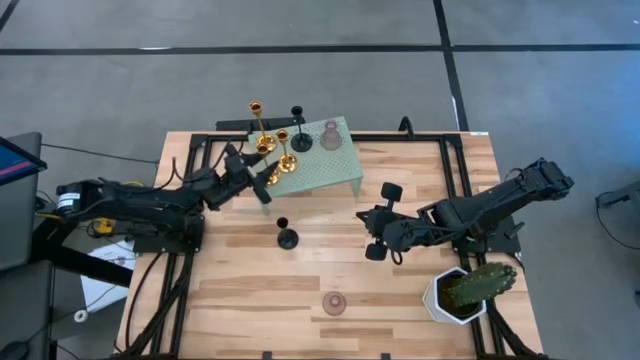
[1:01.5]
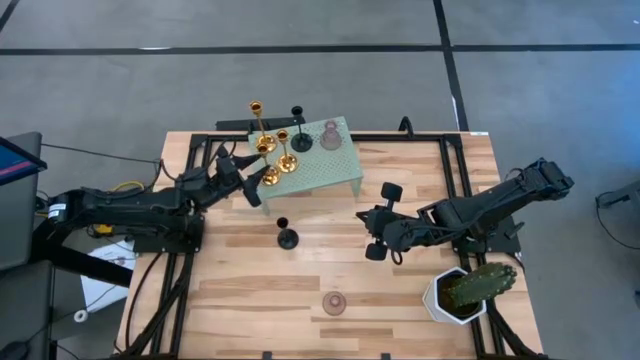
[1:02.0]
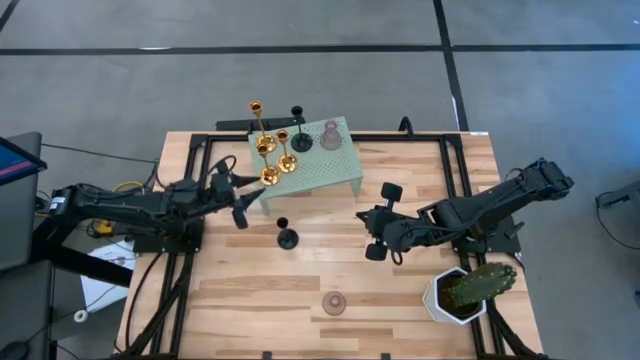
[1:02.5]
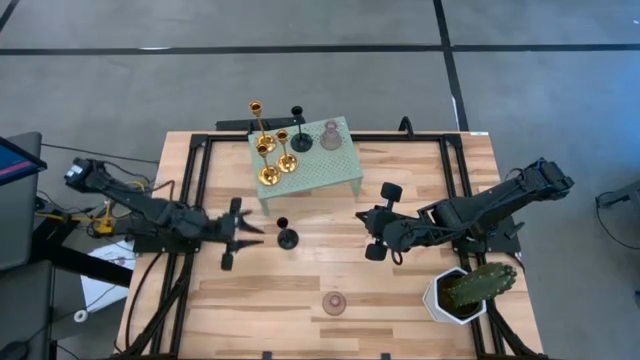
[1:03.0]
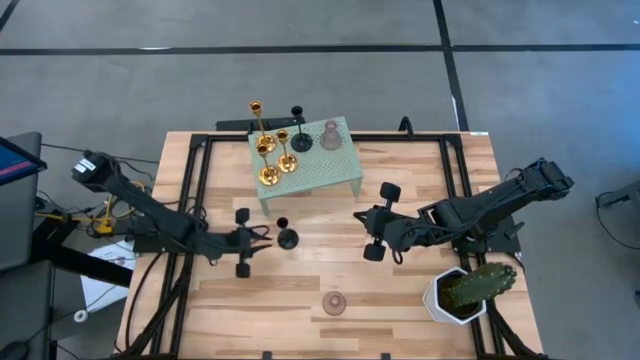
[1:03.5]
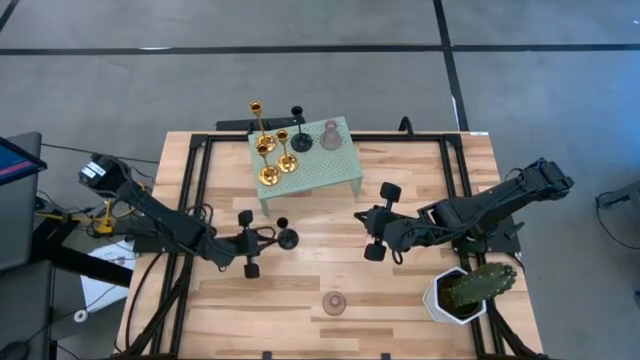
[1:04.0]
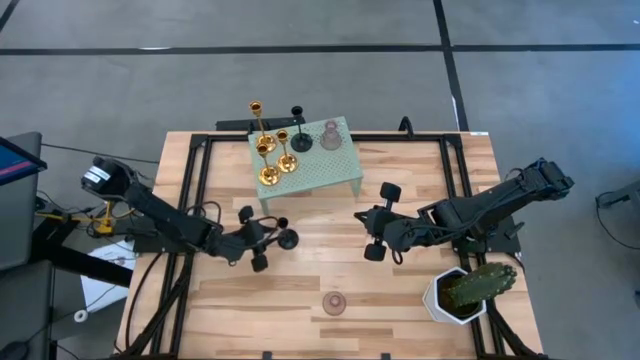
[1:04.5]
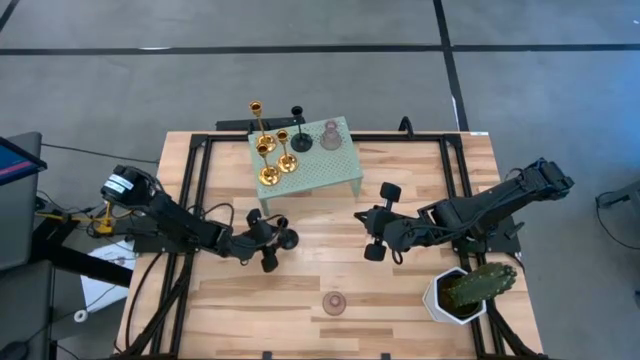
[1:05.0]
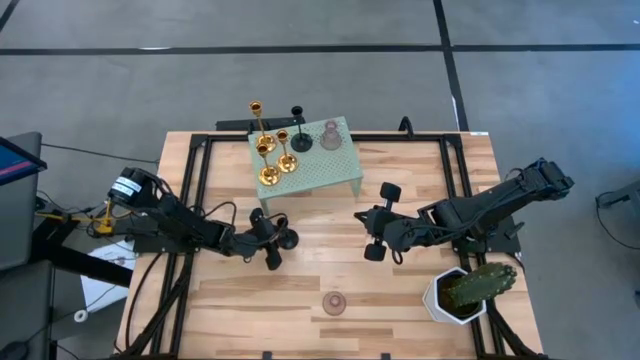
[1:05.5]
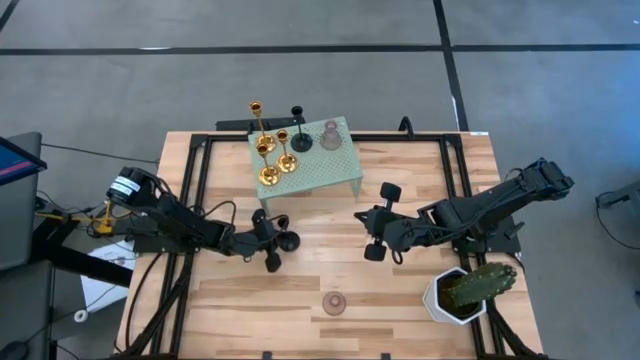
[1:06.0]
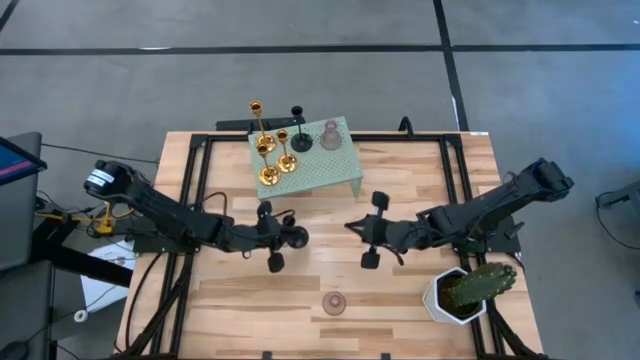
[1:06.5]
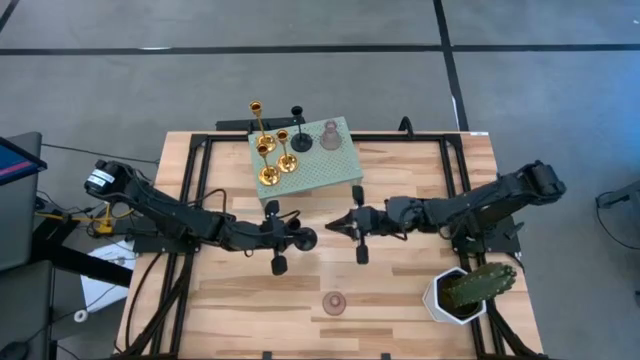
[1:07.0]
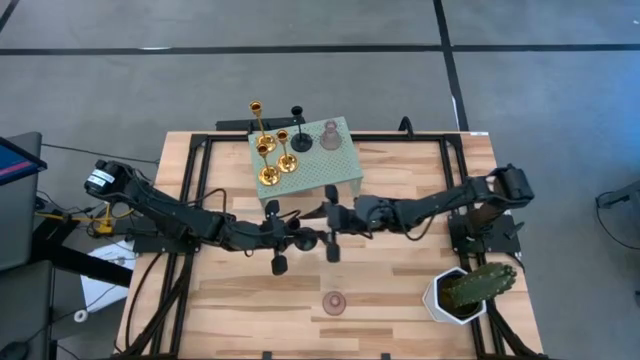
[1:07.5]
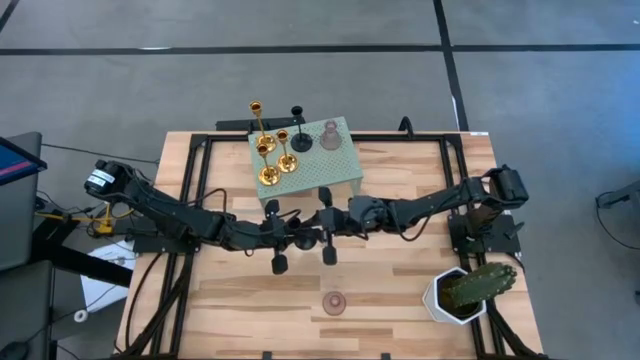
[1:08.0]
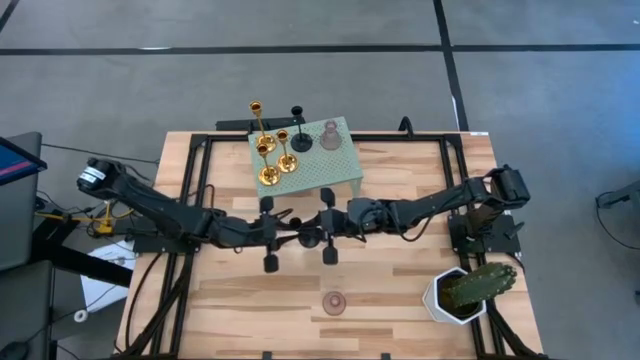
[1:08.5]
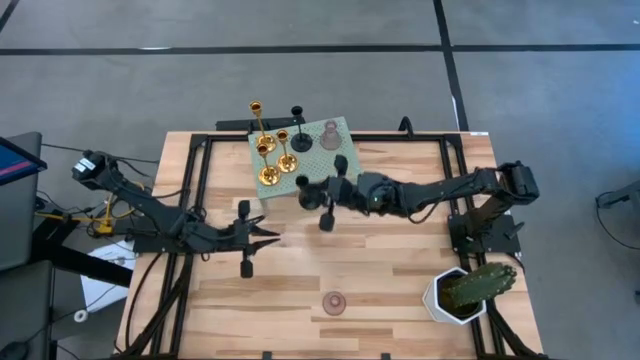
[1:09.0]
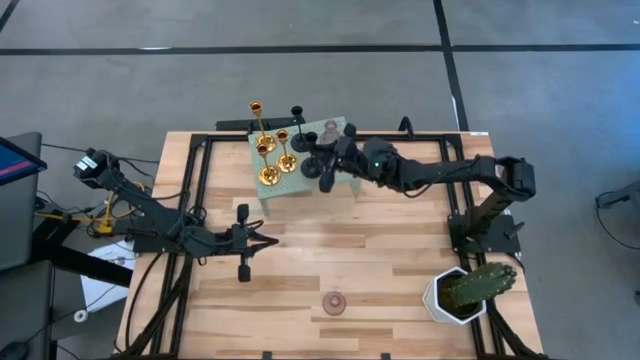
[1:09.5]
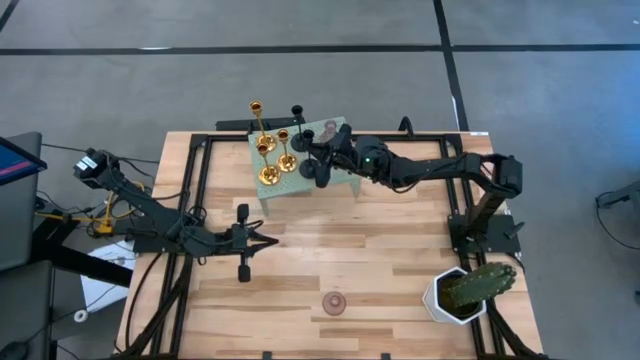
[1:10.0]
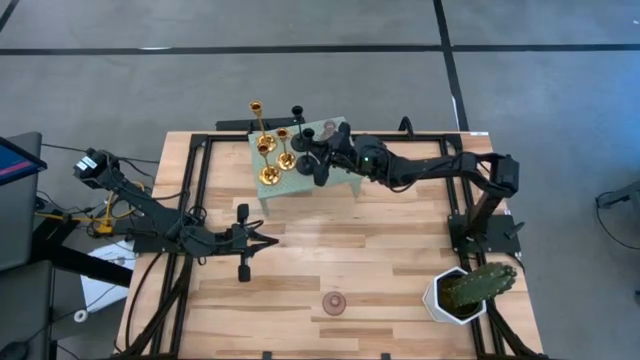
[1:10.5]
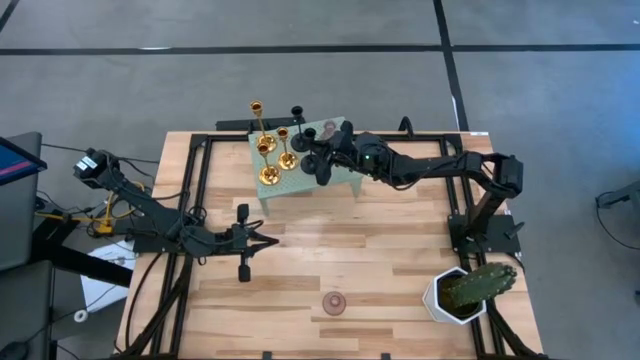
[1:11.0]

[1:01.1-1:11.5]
Task: Pick & Place candle stick holders
Put the black candle holder on the shelf

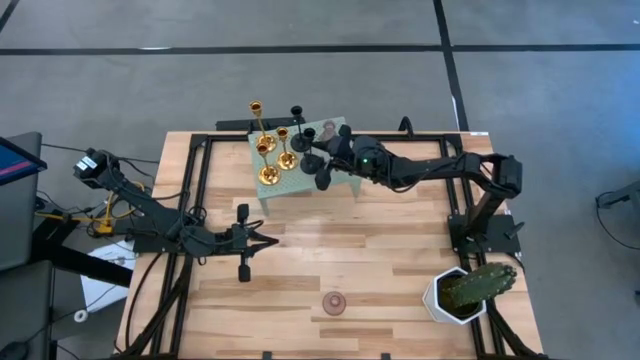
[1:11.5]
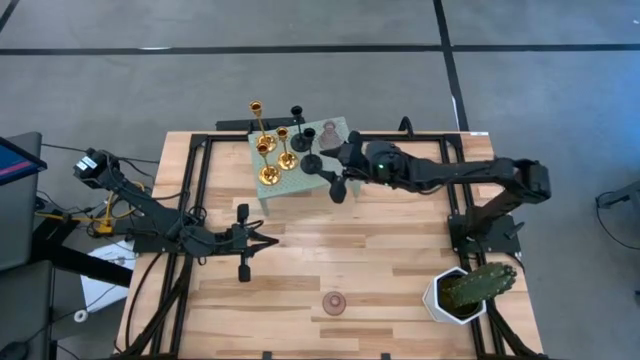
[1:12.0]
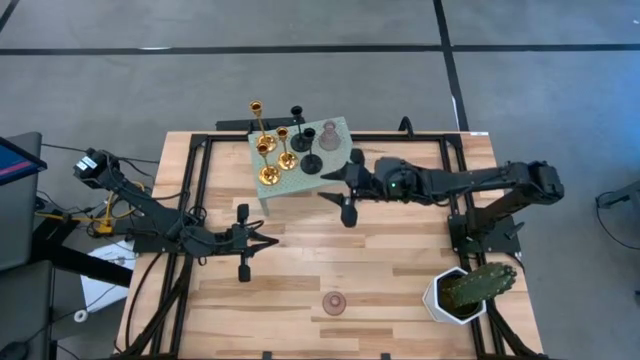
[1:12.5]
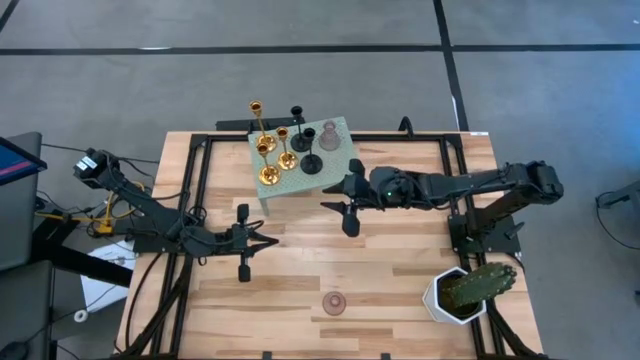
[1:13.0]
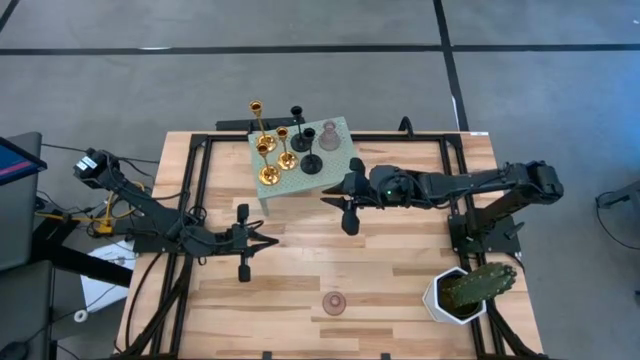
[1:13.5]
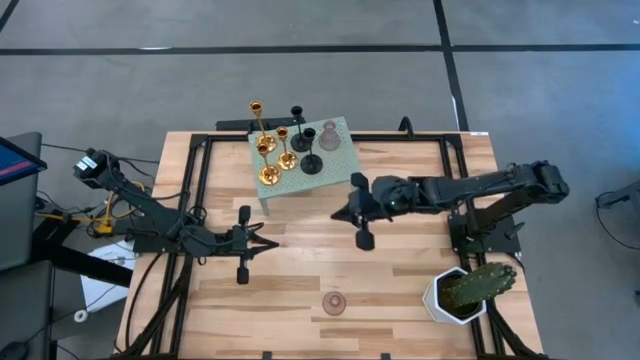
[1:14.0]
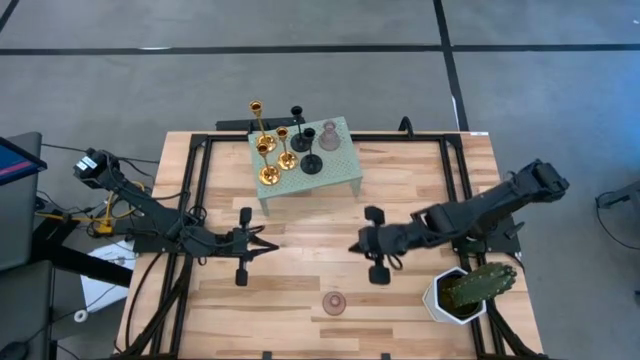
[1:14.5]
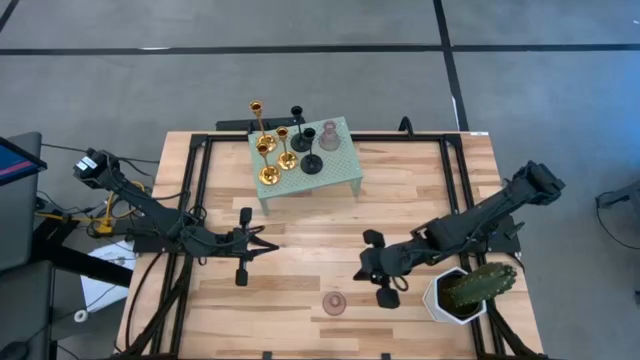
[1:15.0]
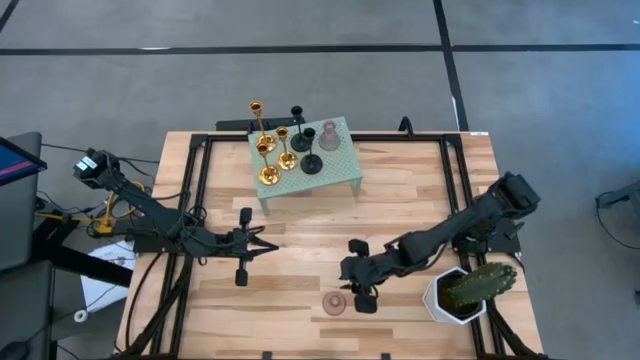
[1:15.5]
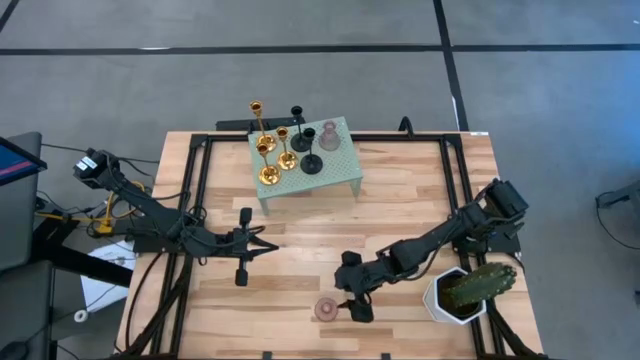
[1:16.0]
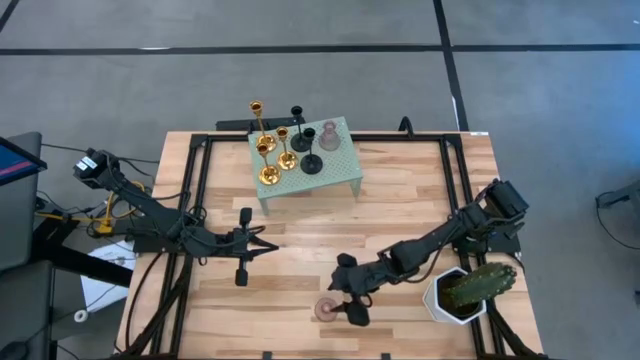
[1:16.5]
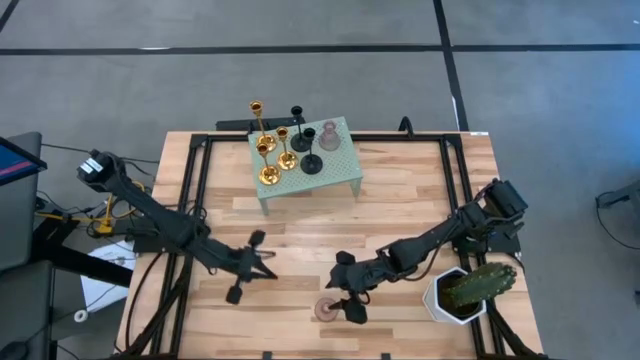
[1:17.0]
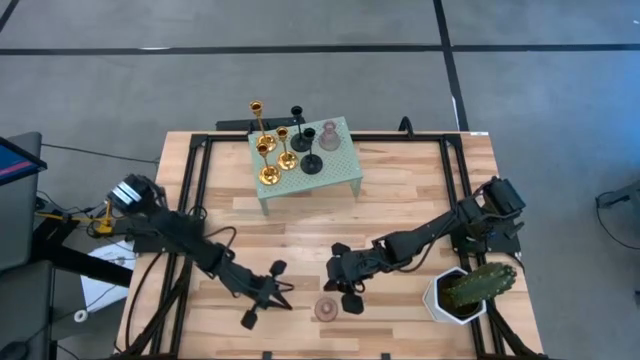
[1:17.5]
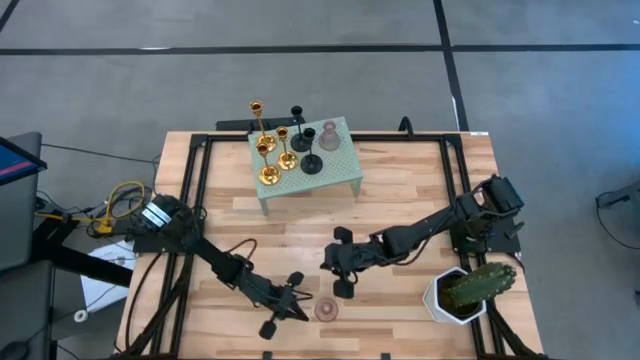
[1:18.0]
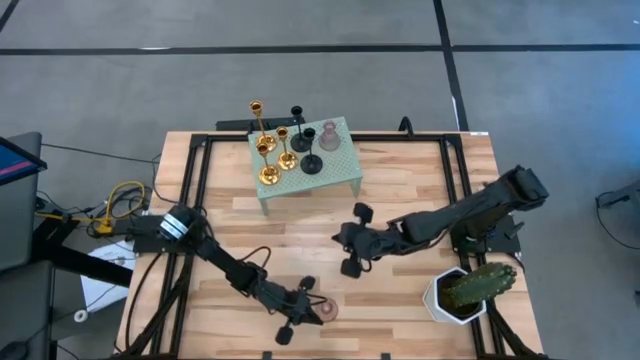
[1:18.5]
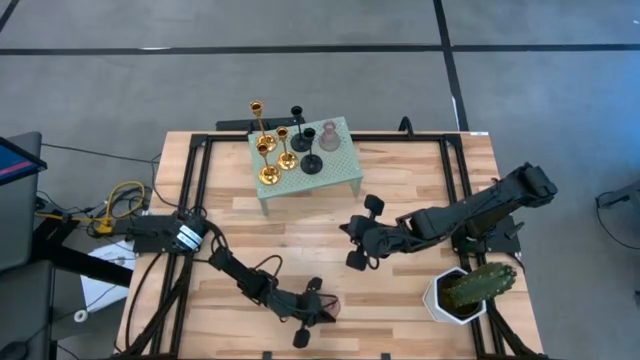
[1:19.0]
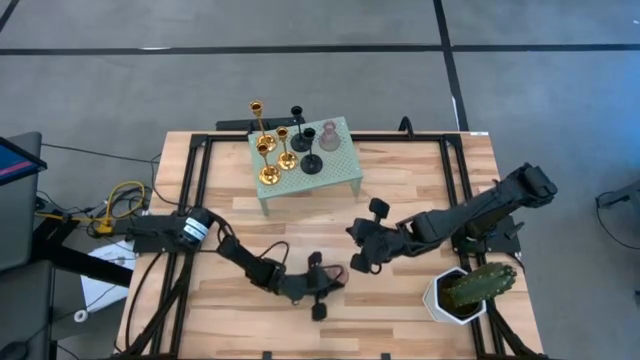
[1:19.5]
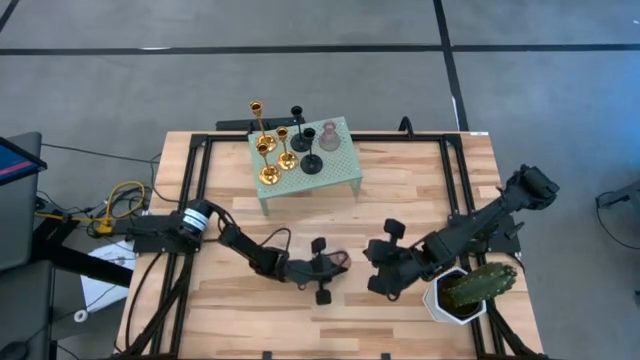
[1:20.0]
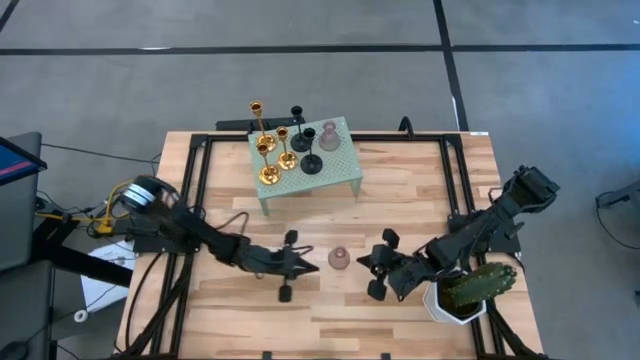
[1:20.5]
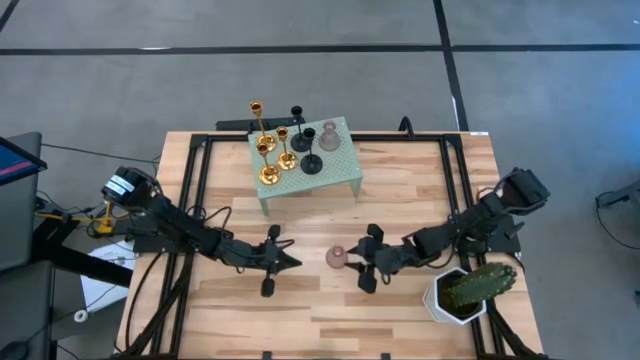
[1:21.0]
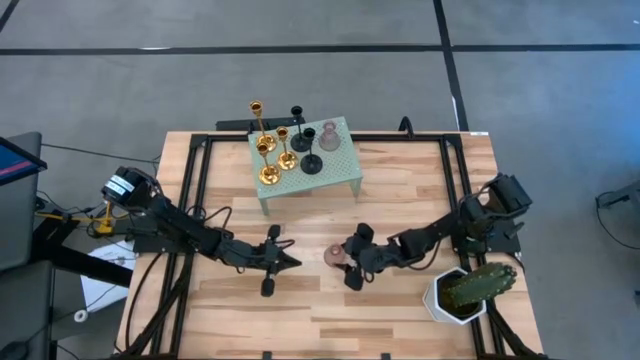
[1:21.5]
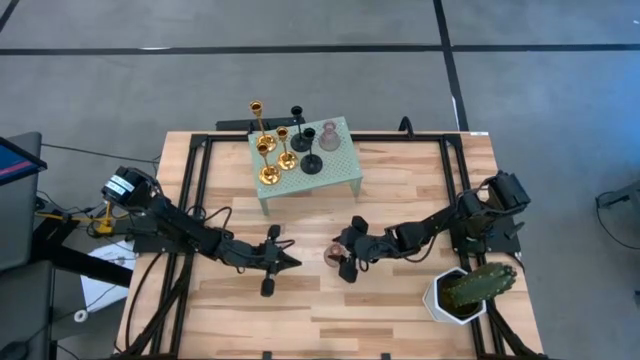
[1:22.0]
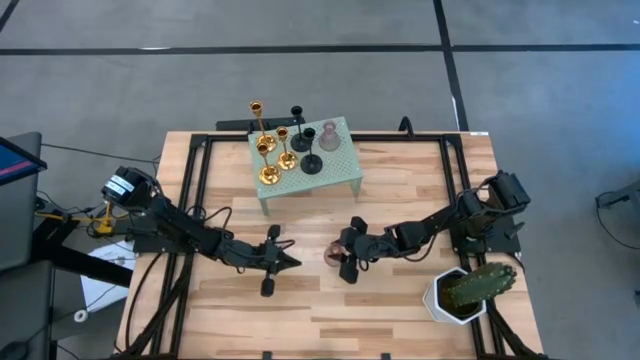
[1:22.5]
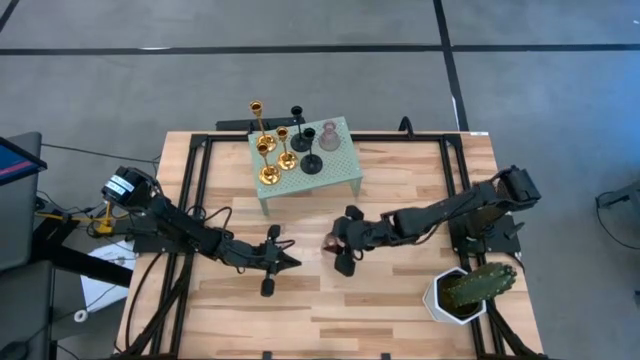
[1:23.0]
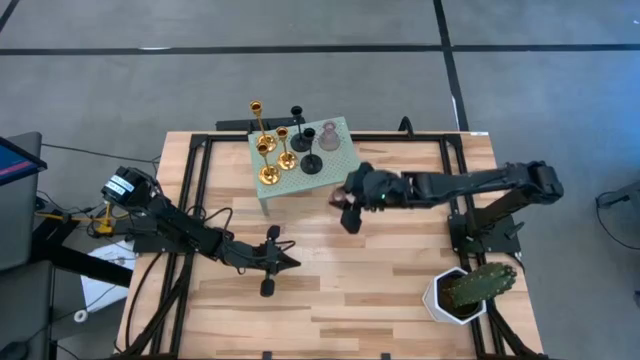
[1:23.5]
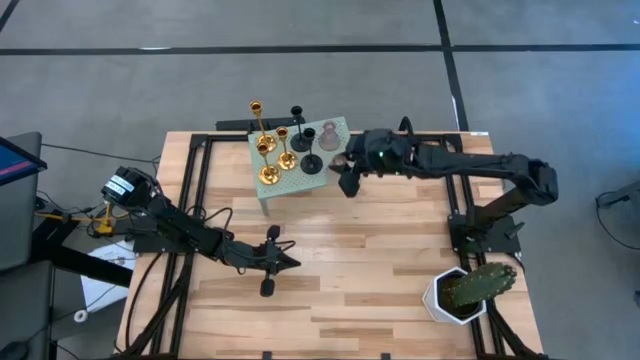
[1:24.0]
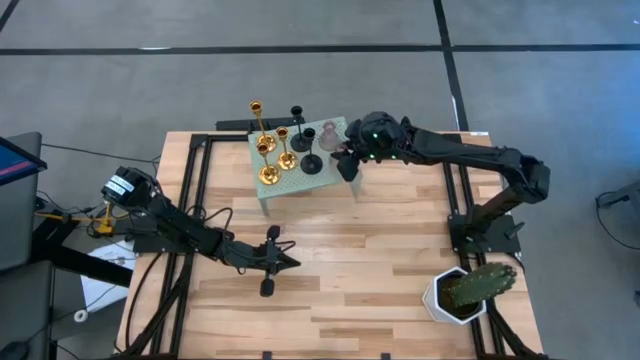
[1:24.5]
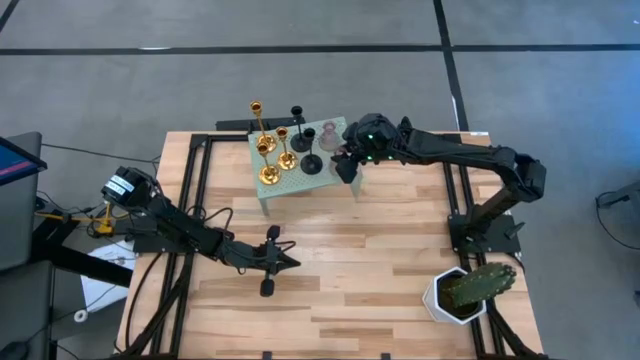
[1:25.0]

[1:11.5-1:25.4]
Put the violet candle holder on the shelf
